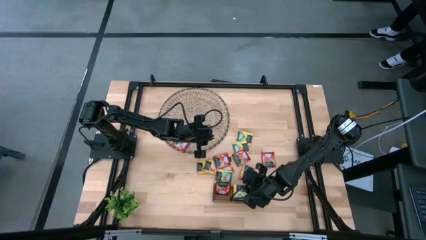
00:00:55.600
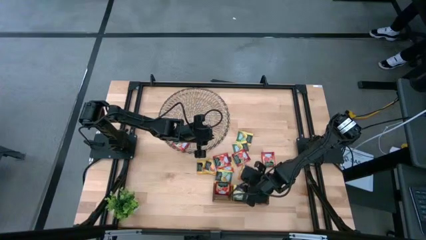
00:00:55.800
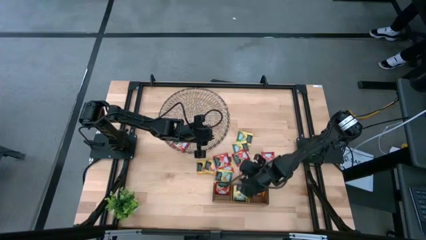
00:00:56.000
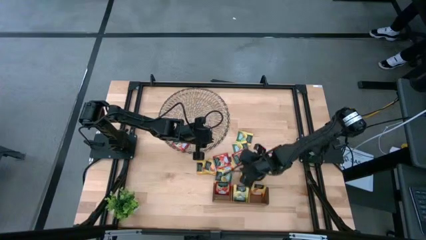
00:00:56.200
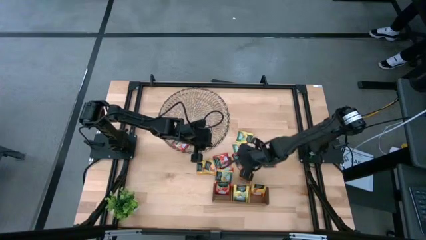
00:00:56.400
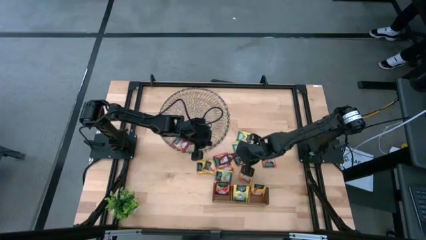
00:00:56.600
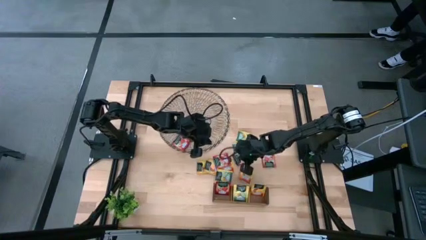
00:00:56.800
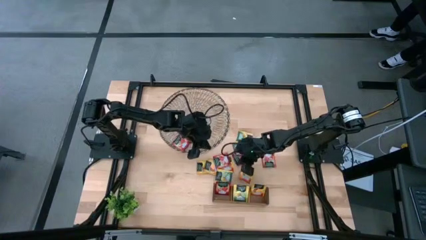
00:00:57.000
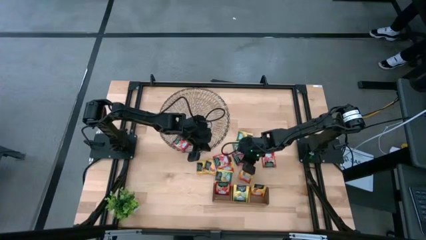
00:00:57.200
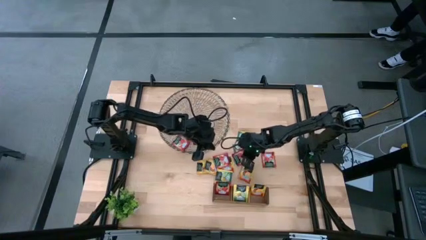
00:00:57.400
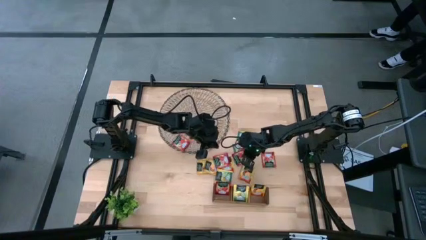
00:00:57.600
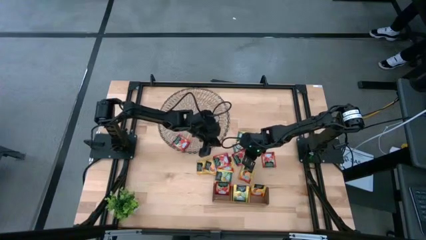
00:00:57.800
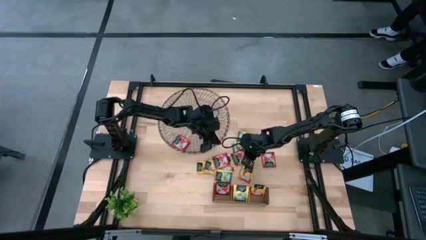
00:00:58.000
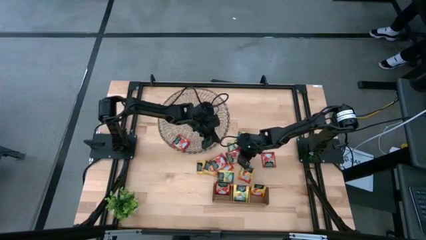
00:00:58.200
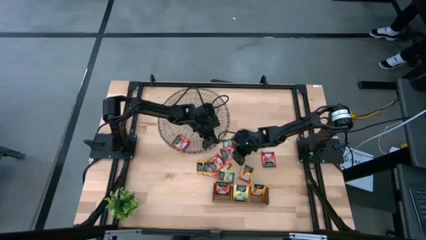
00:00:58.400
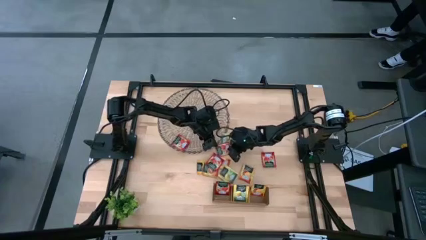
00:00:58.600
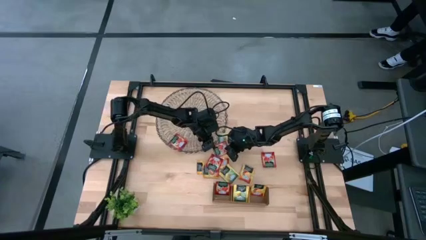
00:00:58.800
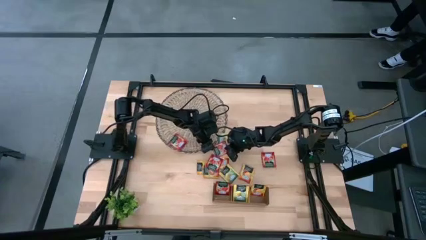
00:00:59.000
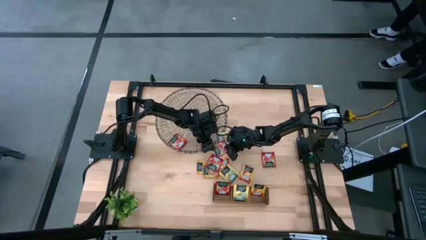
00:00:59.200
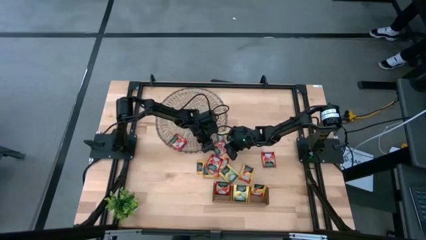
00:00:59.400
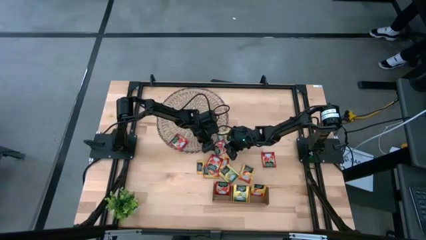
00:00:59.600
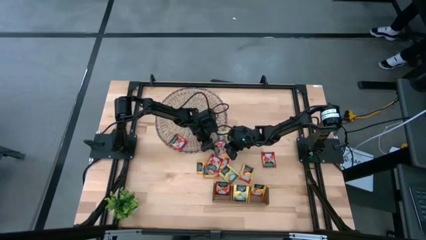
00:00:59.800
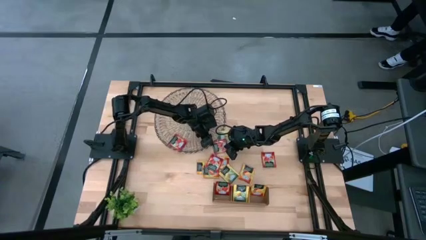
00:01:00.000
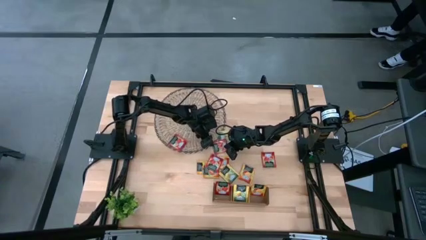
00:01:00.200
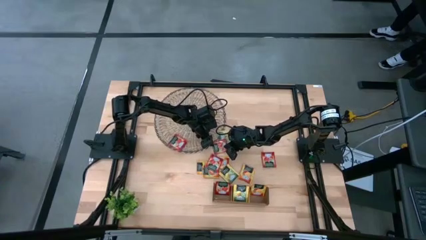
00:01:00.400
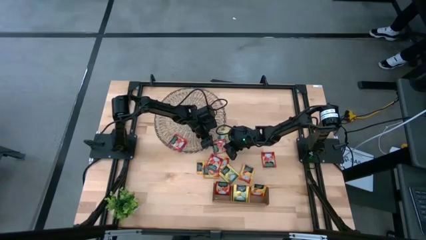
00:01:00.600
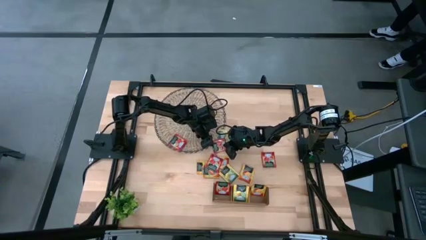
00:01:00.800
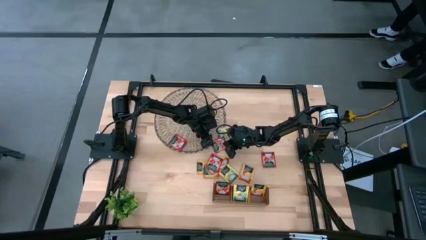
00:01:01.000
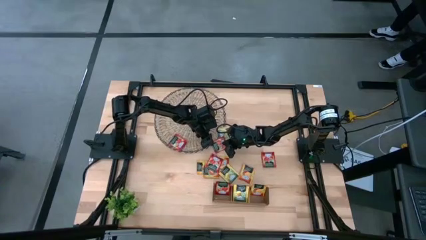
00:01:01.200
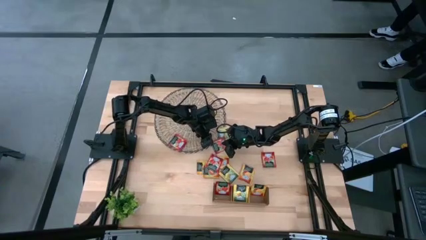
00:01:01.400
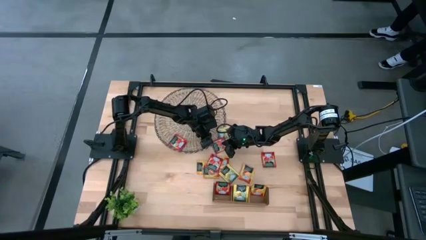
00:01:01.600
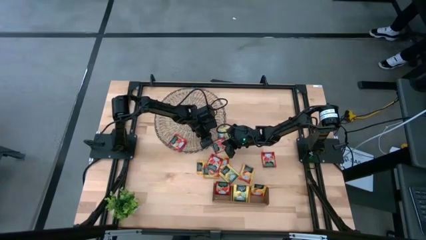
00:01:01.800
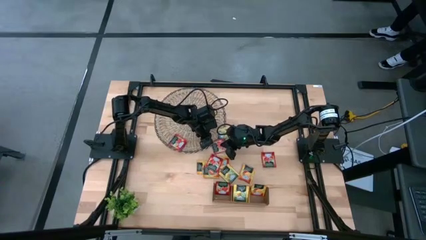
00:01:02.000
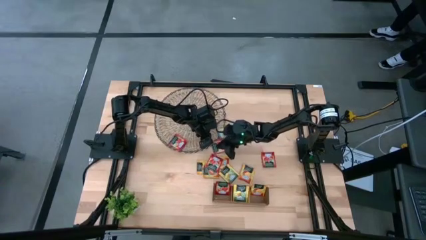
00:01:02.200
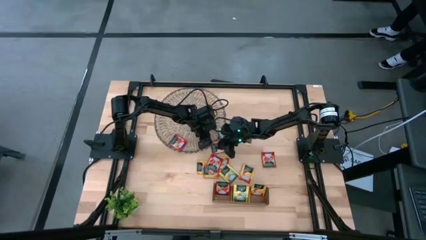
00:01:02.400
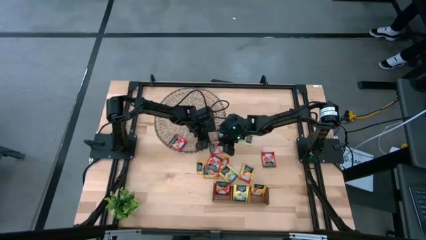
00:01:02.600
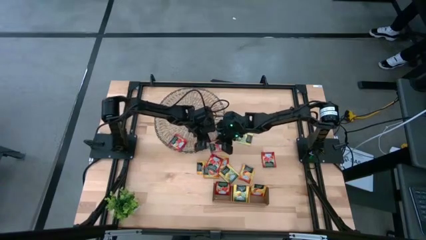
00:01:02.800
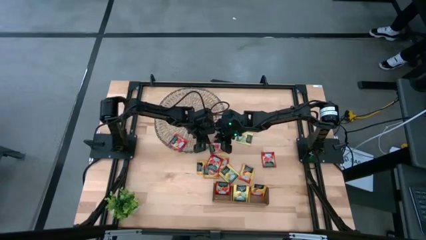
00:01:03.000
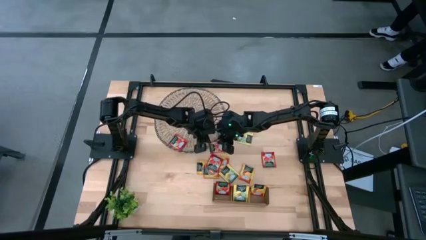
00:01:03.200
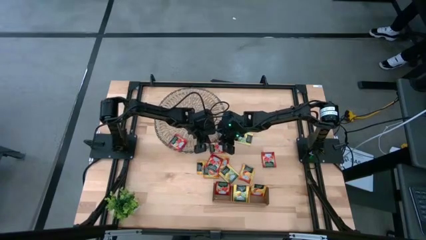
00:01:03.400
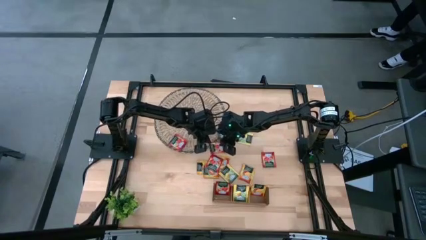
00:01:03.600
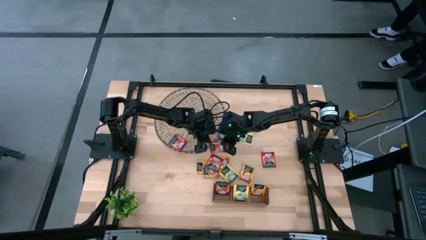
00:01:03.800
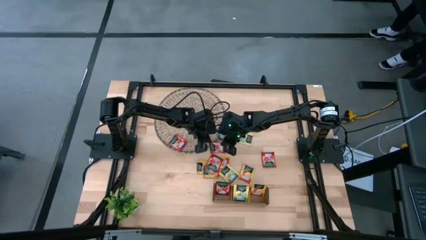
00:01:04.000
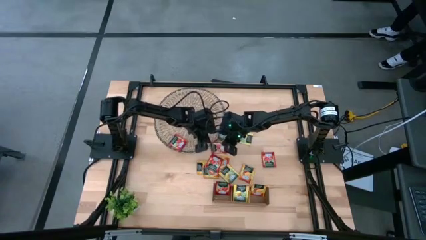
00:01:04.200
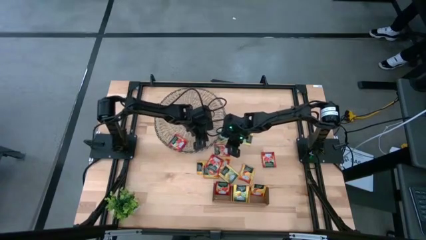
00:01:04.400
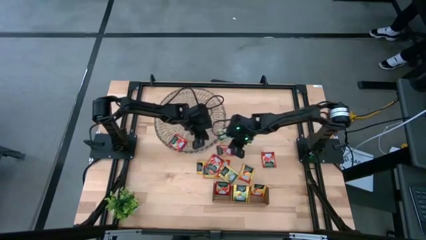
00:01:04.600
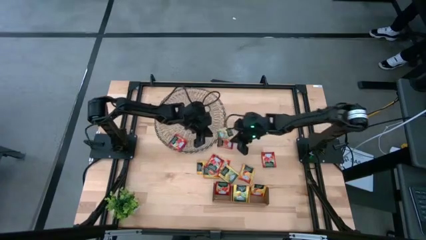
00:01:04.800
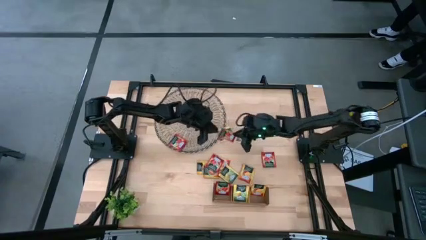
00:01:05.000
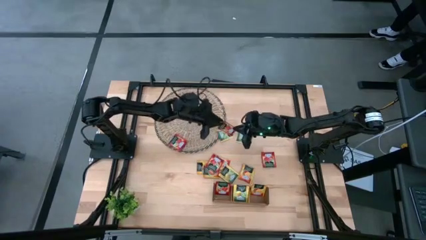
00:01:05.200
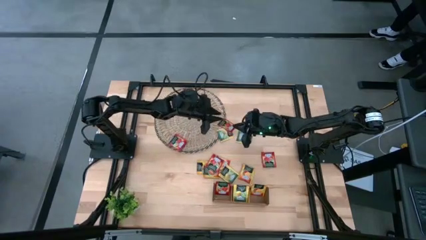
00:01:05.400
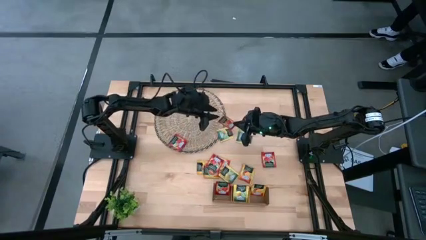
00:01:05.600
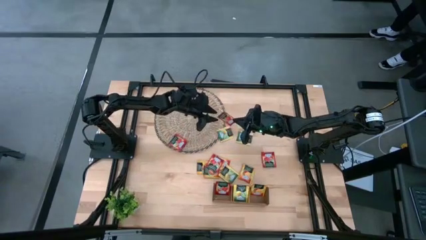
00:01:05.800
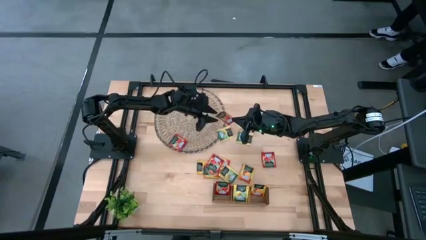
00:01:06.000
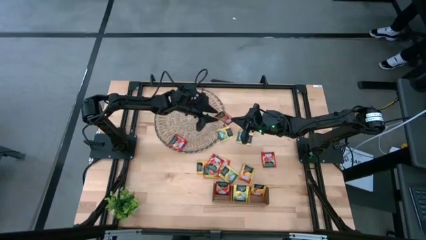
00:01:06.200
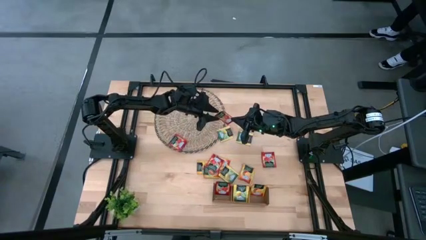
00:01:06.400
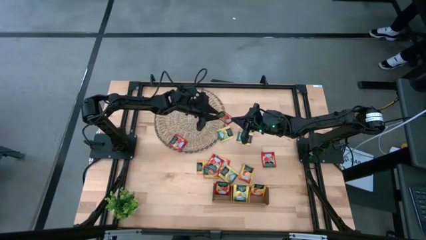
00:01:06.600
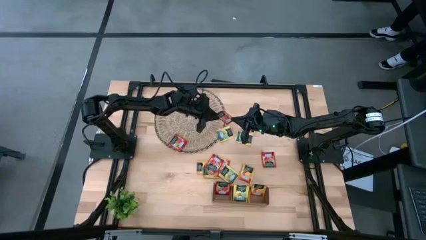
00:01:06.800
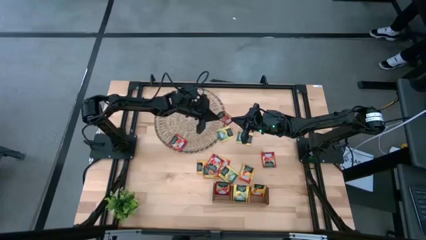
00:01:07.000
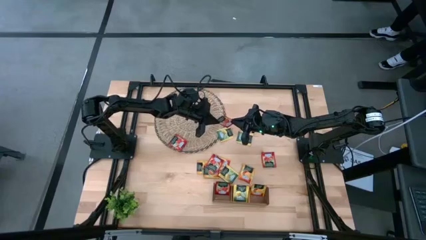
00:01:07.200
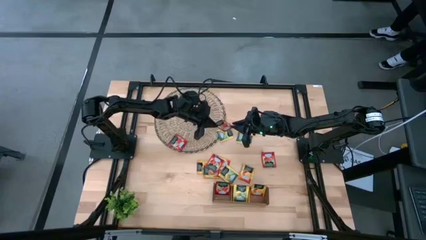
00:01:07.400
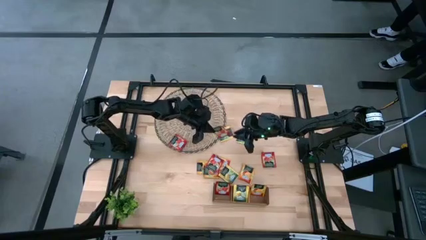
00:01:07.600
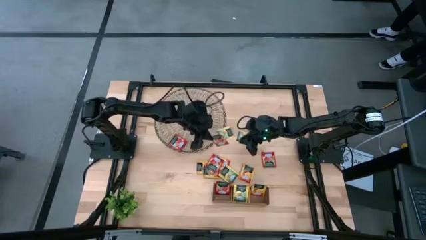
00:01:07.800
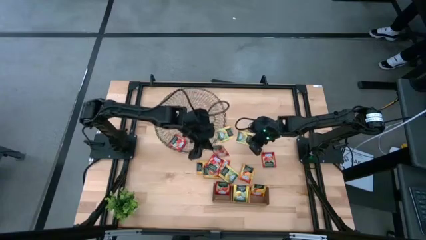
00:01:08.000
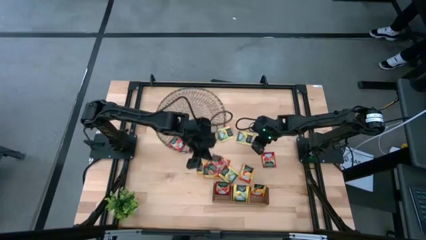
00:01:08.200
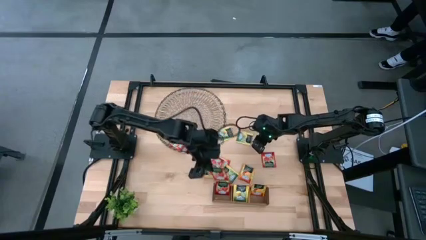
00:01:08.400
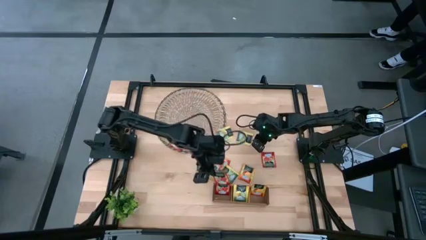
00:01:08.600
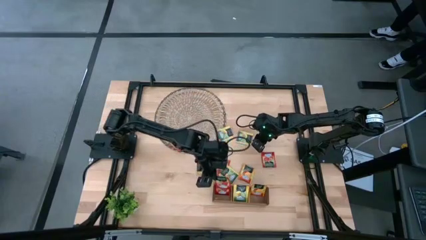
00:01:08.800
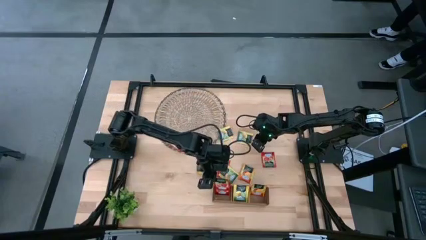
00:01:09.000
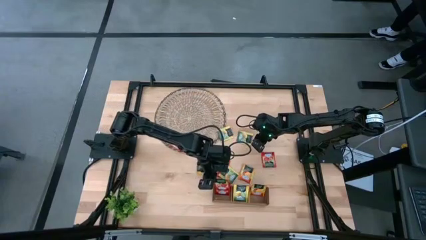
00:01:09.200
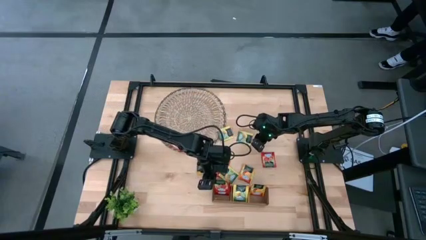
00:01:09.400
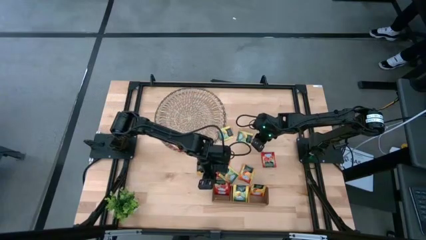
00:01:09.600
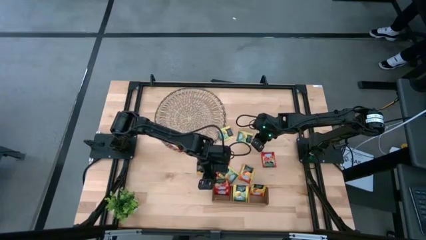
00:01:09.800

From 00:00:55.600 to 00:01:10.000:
Task: Pick & Place Tea
Put the red tea bag into the left section of the wooden organizer

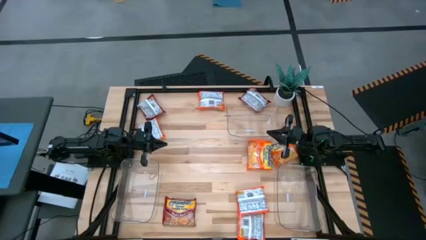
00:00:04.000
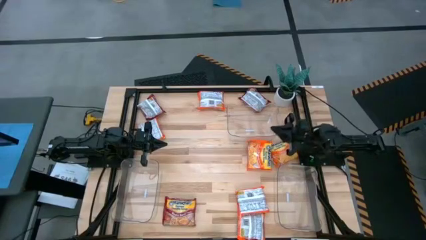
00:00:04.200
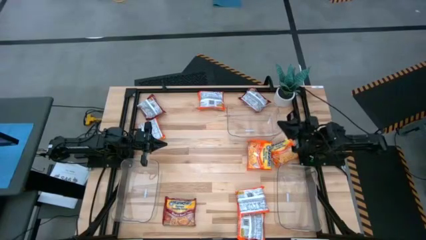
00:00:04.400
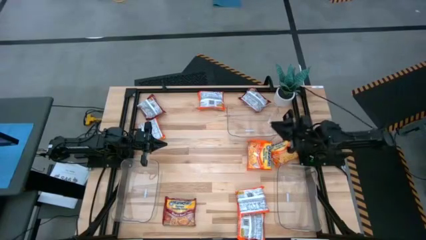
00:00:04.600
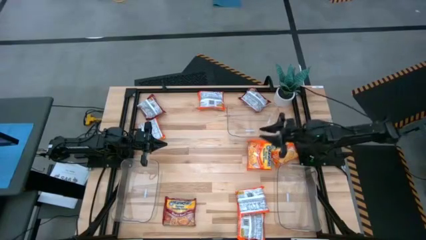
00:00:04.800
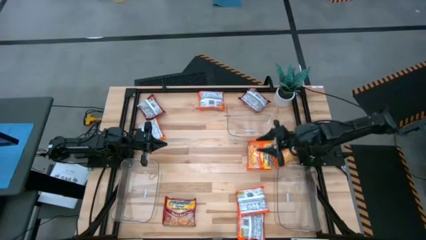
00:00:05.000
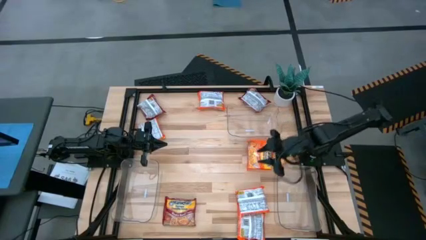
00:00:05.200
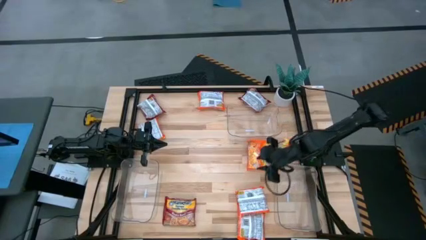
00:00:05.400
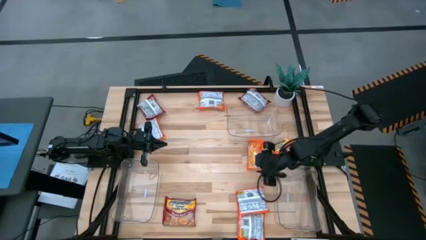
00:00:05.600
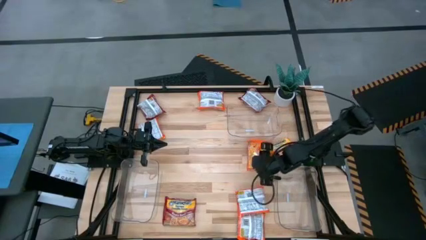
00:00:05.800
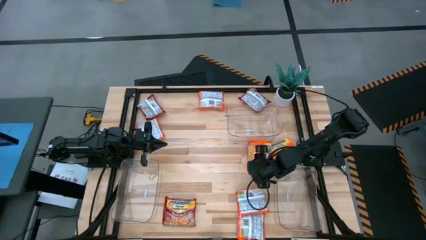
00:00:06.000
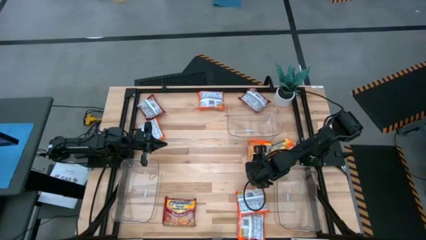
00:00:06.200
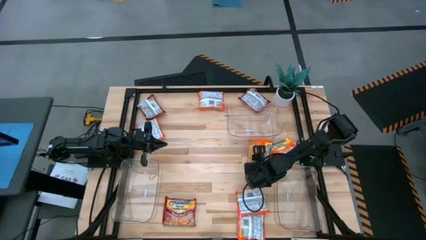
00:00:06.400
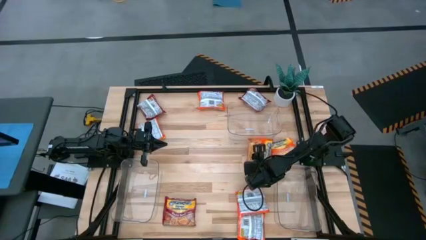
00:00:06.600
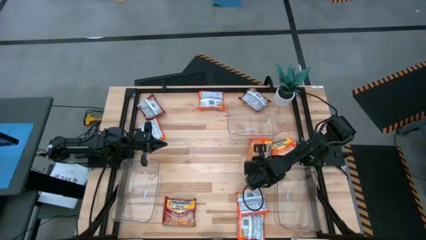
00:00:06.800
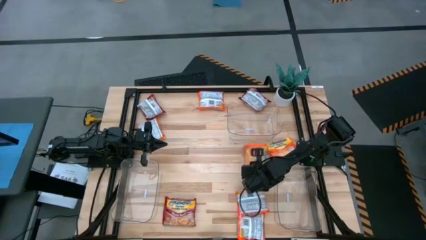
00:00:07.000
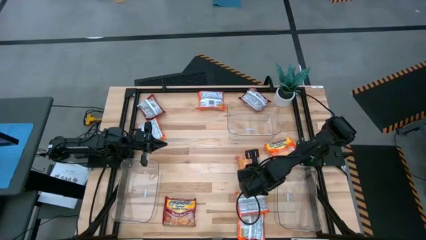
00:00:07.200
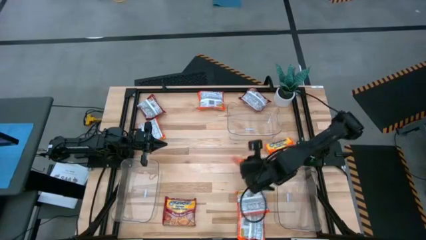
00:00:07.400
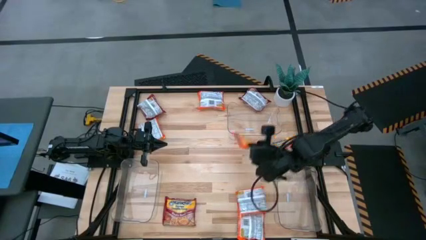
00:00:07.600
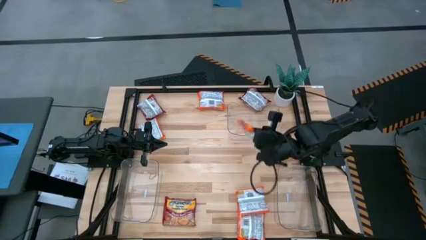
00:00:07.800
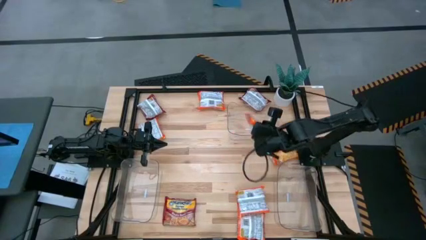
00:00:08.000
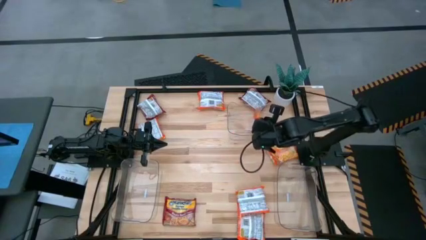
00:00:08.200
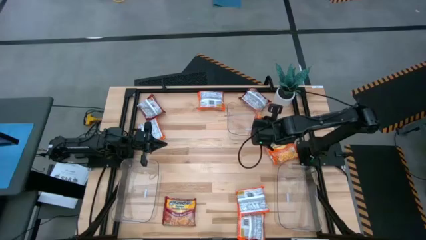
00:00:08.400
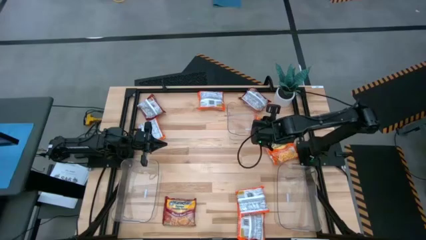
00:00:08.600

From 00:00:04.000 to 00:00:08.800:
Task: Sort Maruchan noodles
Put the orange noodle pack into the top transparent bin
